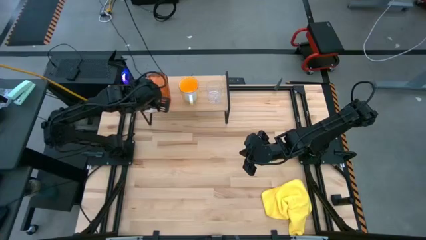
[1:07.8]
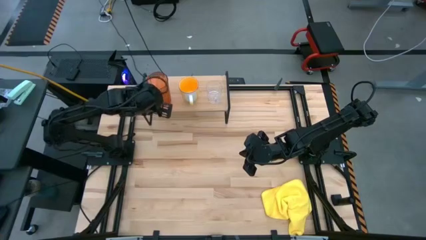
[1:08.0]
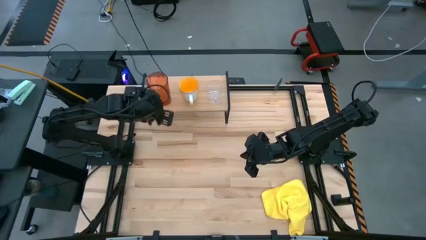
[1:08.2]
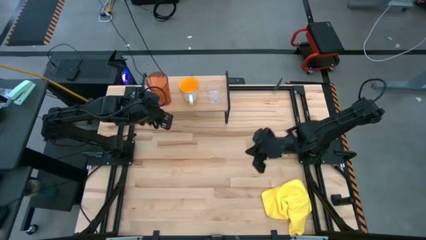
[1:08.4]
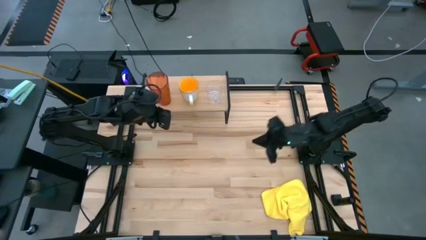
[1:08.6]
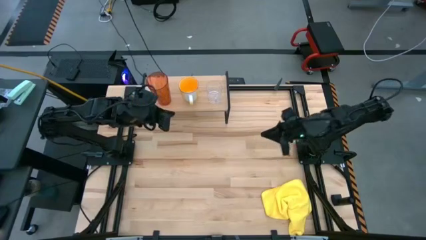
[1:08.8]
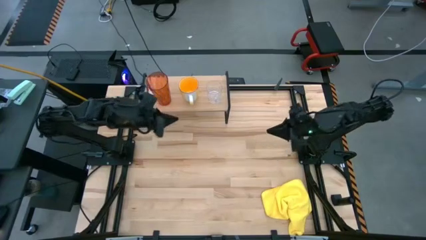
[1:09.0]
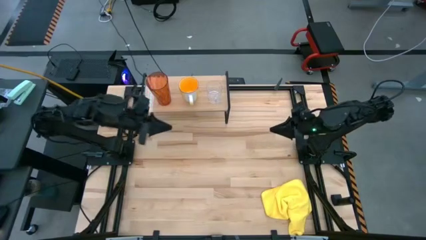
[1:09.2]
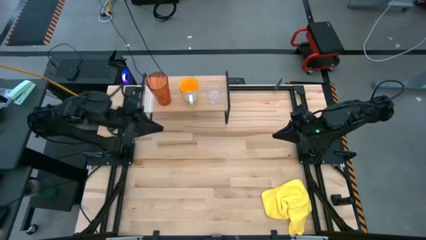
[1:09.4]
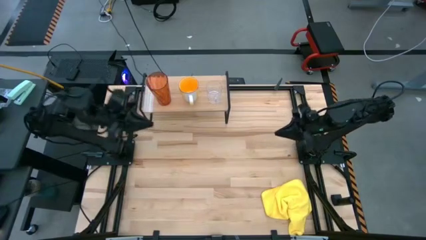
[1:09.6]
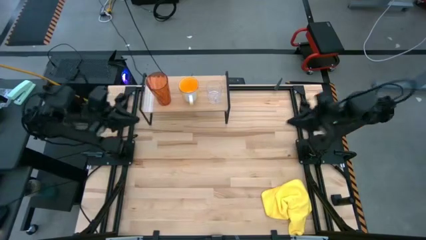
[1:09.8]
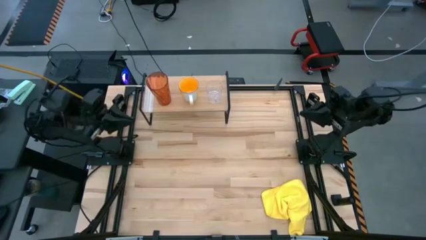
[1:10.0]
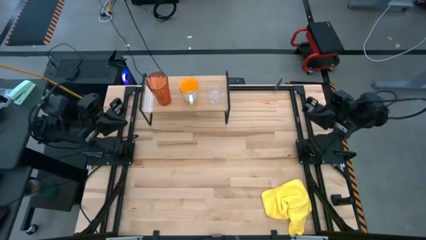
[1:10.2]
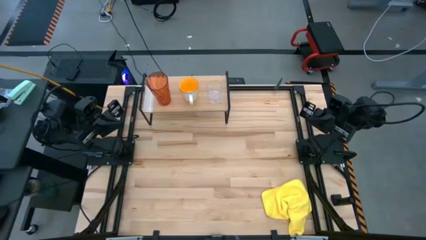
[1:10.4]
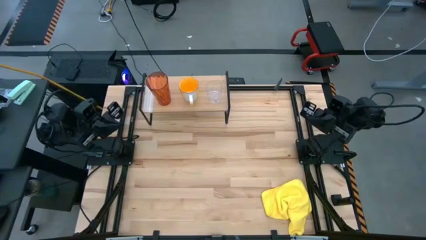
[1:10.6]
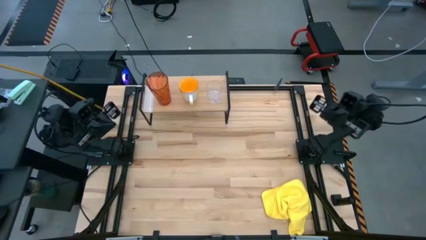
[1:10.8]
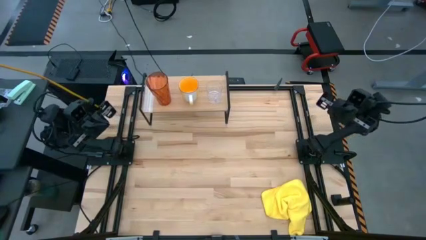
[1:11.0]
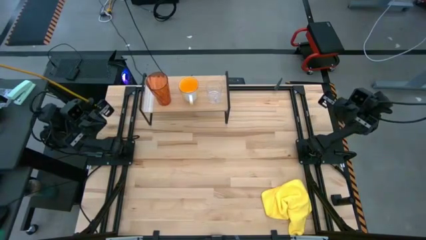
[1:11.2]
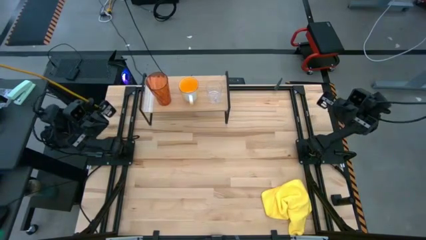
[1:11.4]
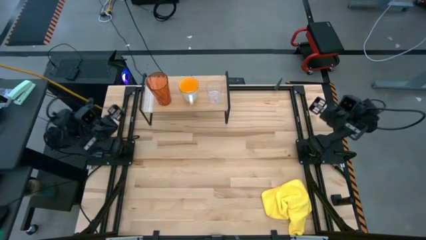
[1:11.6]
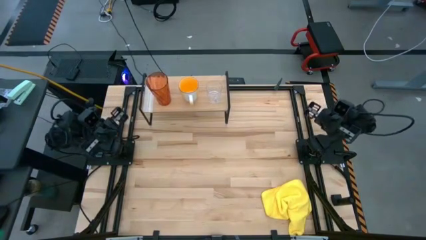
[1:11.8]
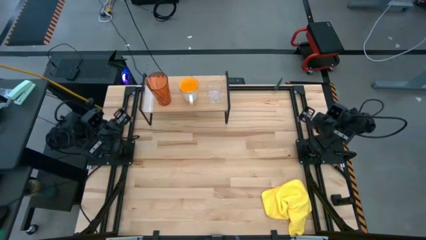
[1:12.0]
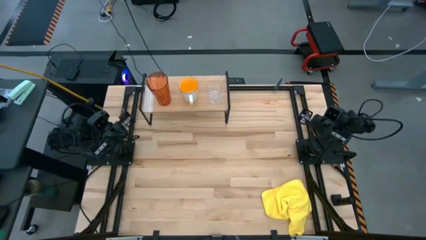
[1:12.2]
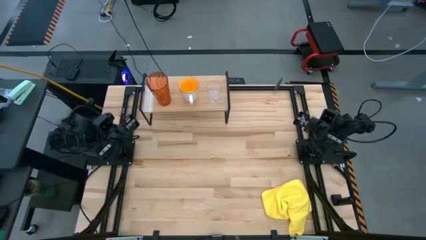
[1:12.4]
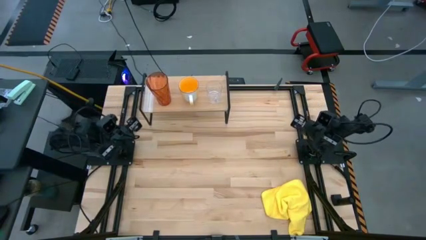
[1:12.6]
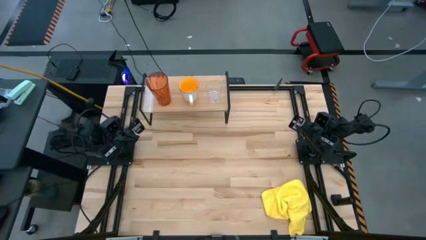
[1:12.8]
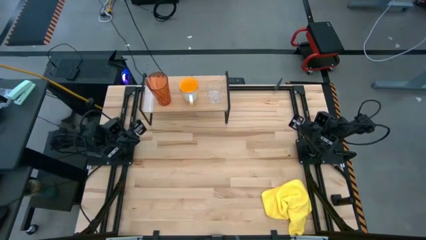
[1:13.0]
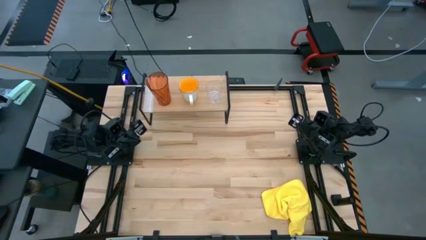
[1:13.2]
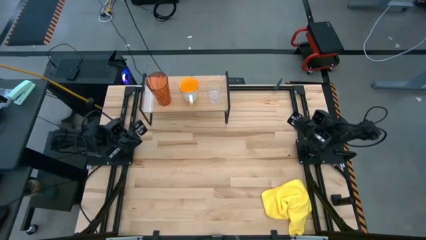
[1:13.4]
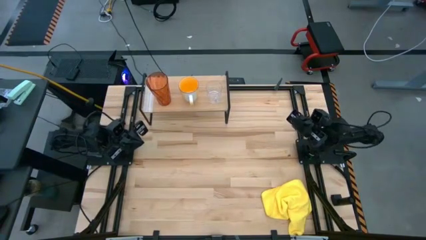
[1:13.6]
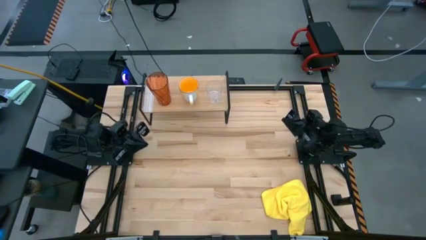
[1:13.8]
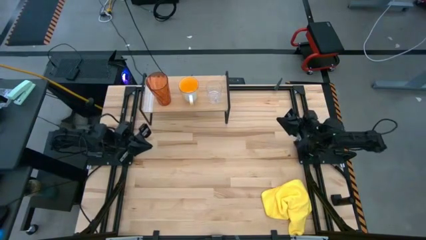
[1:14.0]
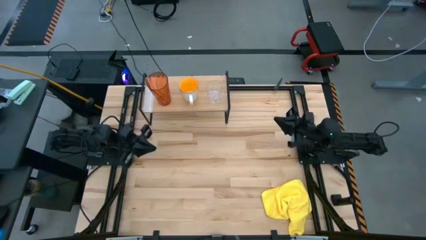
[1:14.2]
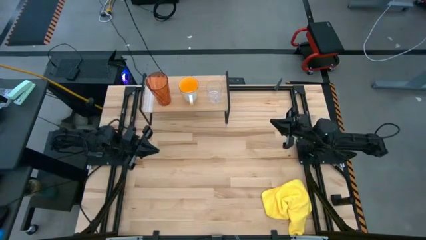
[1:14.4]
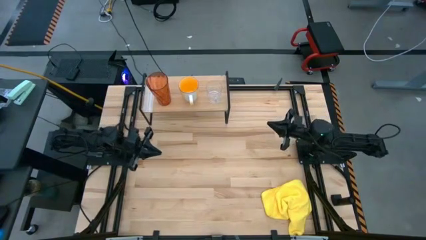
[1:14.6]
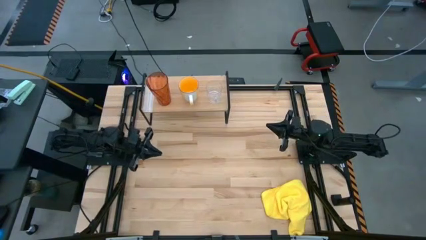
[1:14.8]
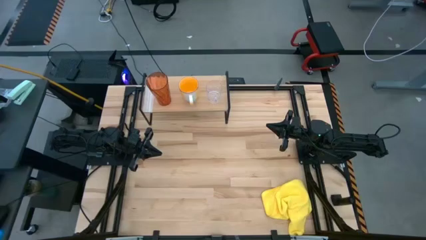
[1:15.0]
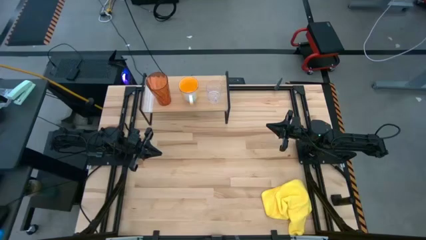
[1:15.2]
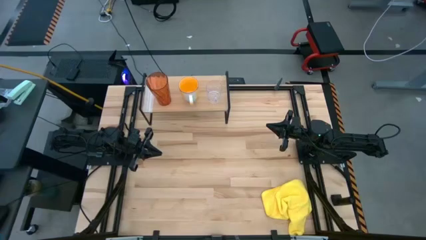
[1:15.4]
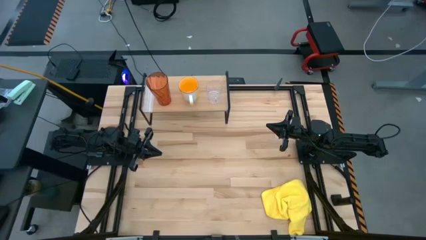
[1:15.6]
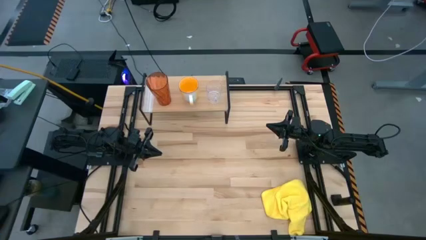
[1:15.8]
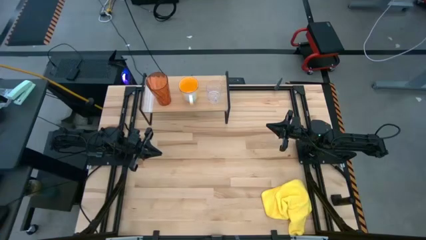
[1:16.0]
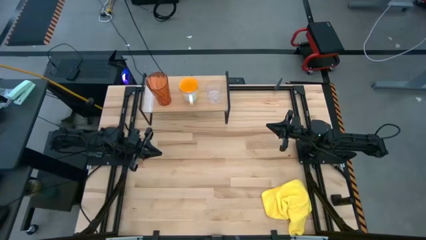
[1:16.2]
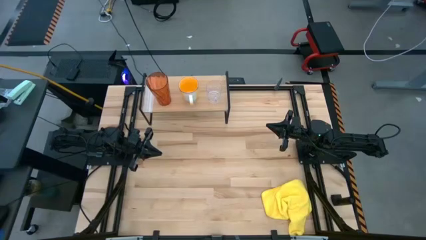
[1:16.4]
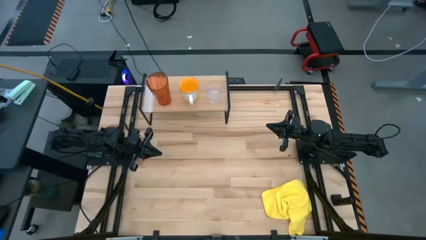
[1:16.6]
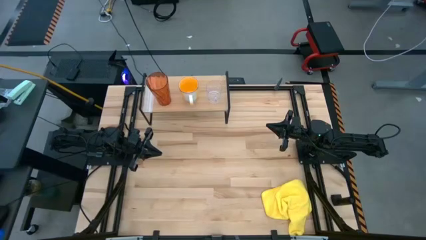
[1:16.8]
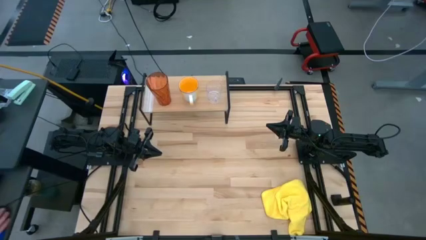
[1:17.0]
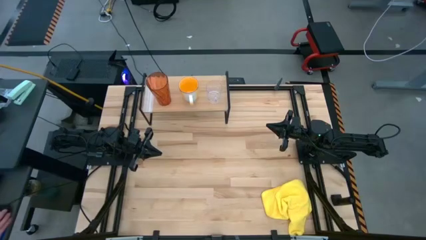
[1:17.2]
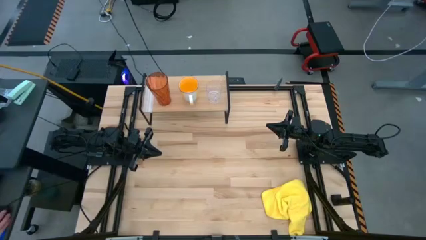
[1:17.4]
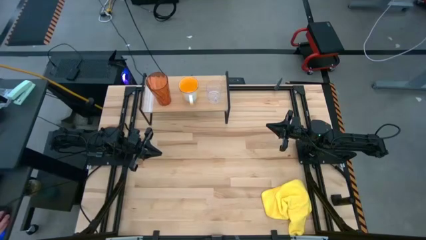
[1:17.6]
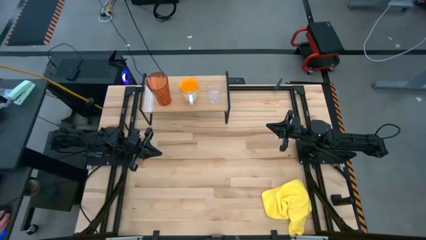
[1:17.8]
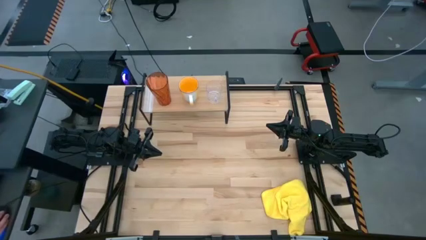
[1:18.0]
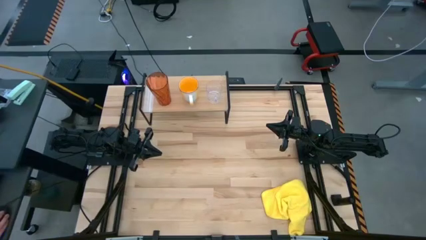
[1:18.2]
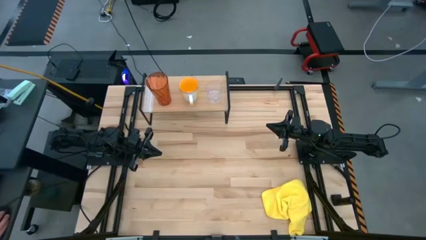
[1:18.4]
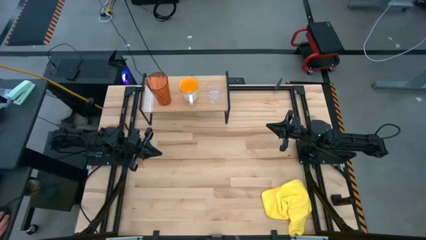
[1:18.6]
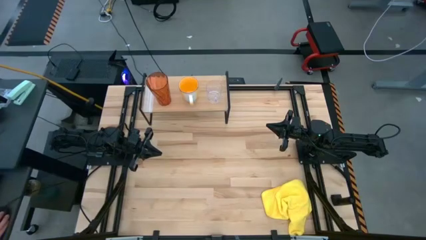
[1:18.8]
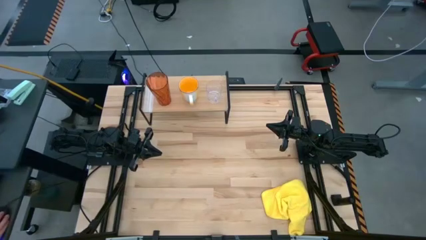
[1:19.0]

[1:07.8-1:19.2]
Task: Stack small to large cups/mugs on shelf
Return to Home Position
